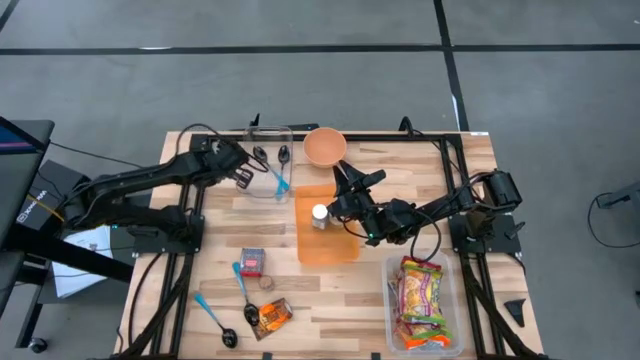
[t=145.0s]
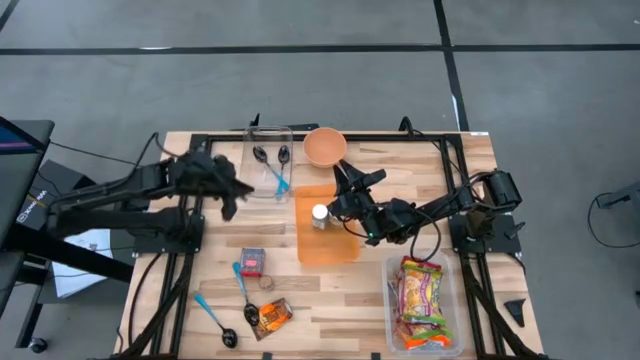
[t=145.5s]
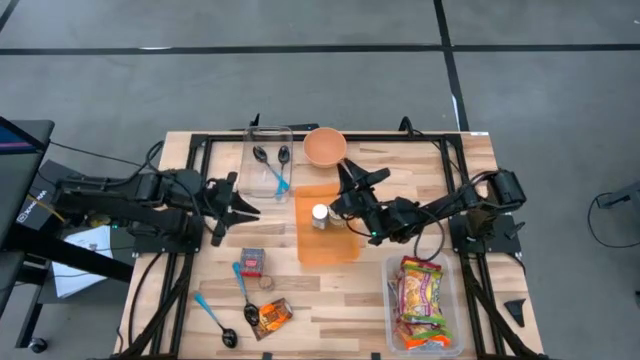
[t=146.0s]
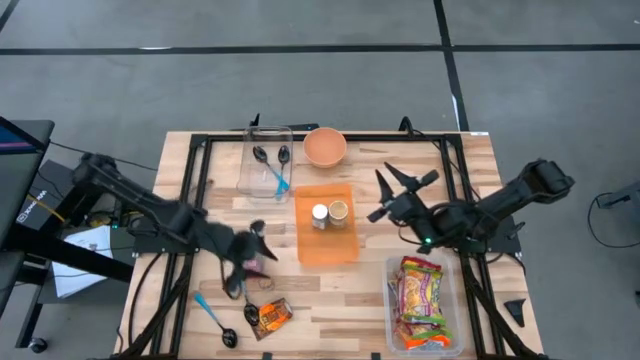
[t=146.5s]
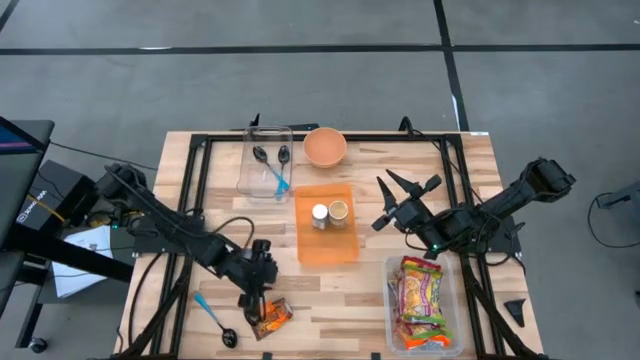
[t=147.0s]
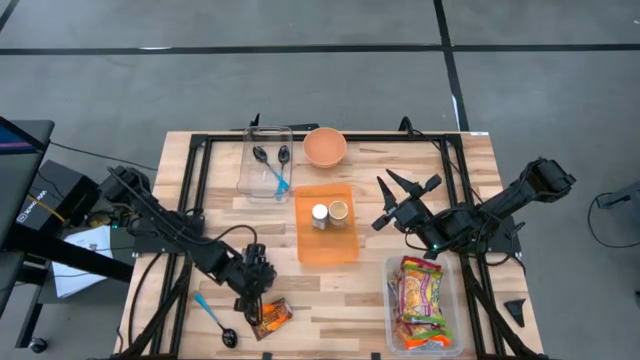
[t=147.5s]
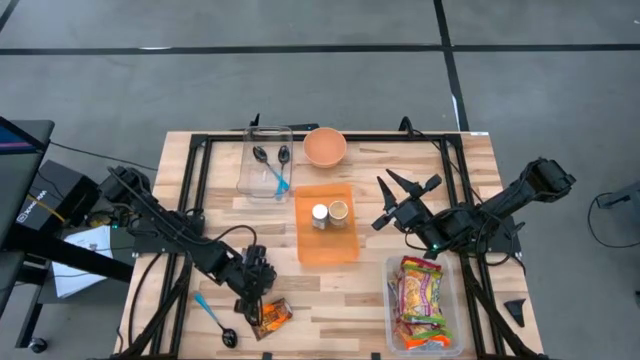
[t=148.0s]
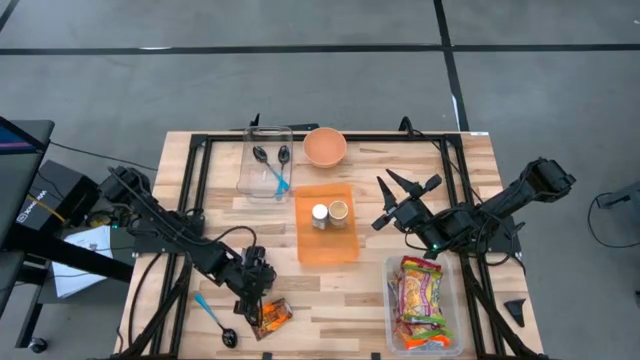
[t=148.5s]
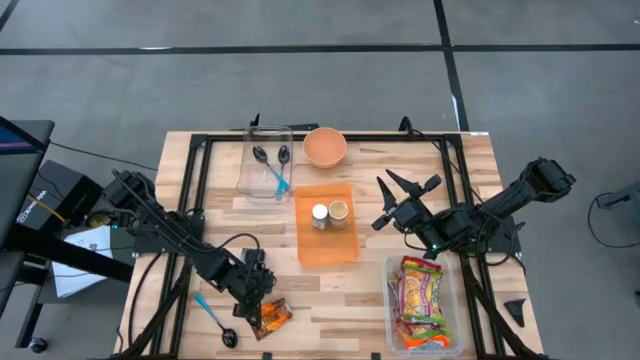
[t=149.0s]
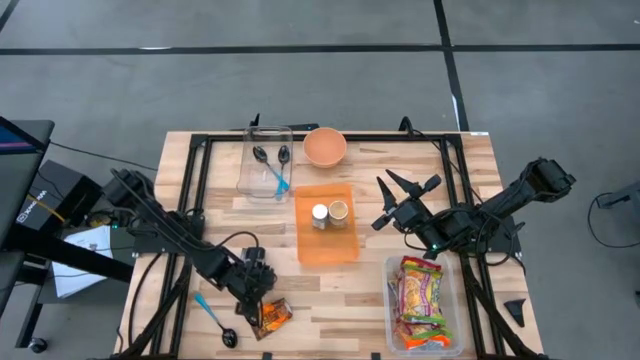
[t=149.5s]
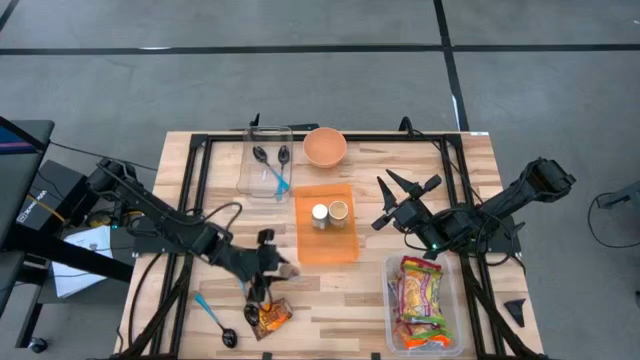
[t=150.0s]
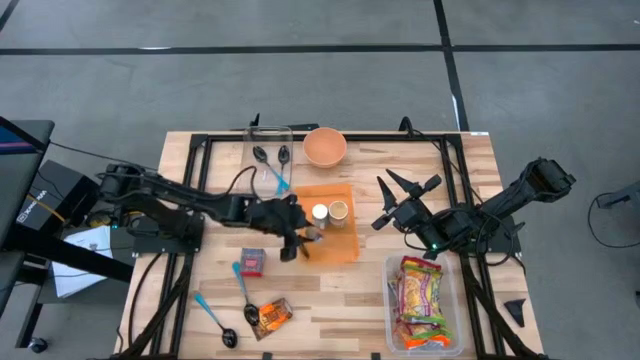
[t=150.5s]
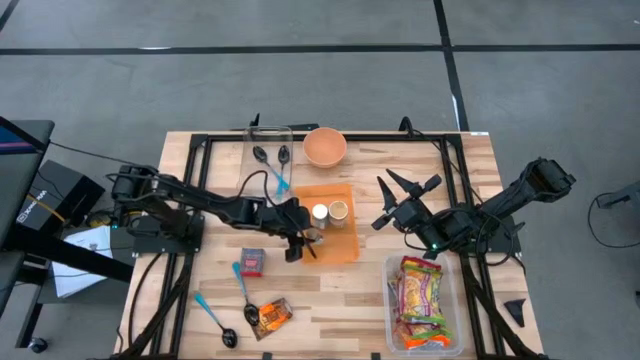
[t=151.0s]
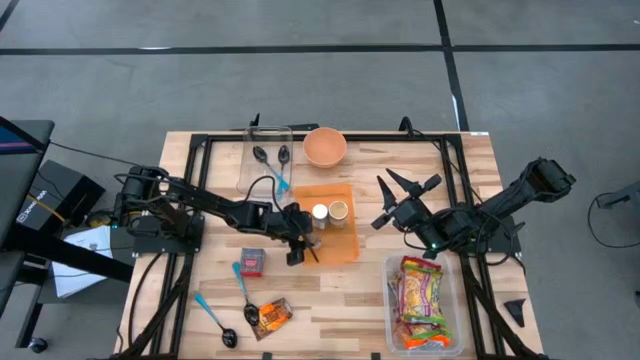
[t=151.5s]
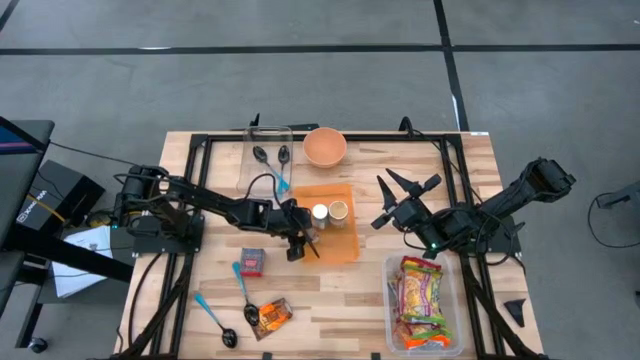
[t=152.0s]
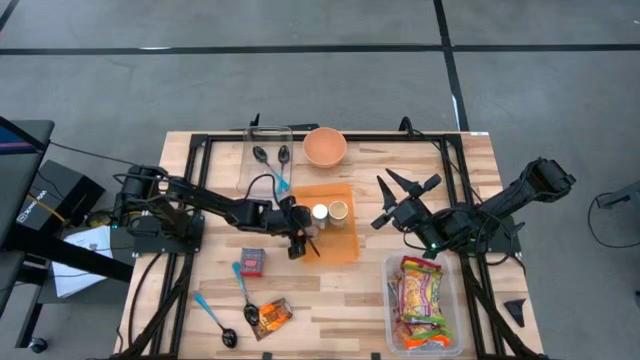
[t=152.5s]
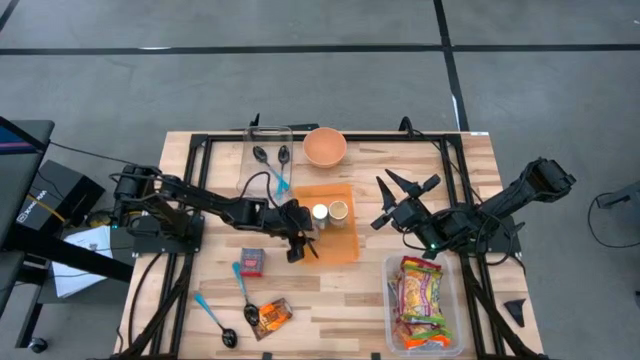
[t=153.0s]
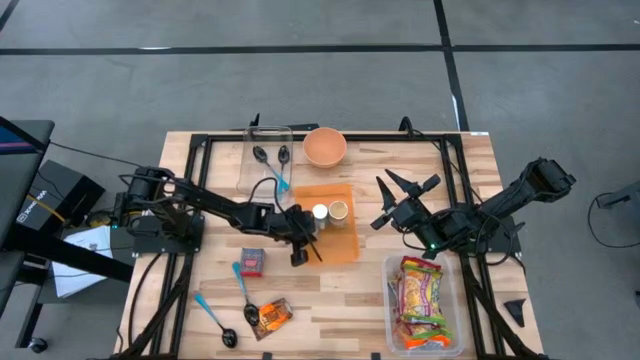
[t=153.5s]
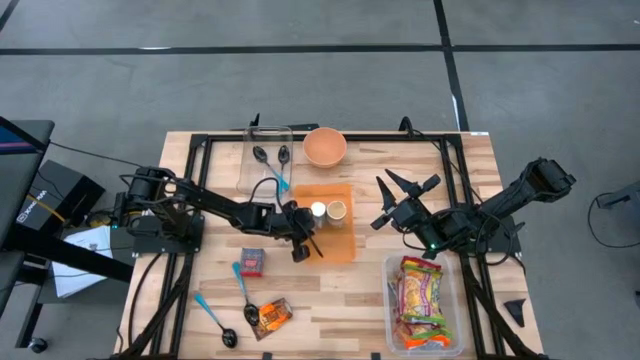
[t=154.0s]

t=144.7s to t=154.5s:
Task: Pick & Place Food Item
Put the brown seasoning bottle into the orange bin

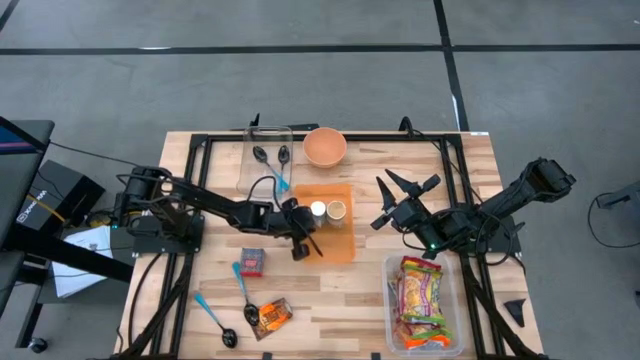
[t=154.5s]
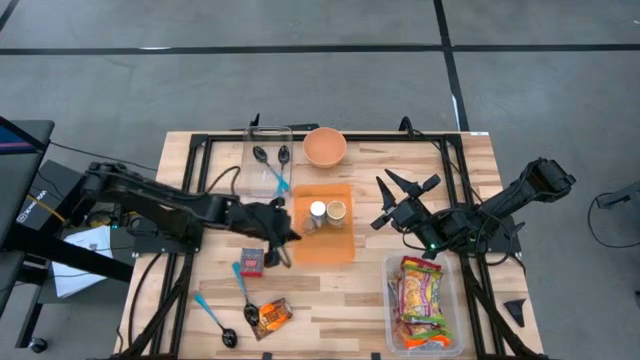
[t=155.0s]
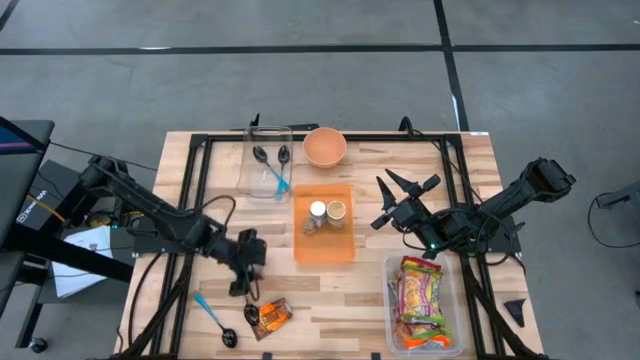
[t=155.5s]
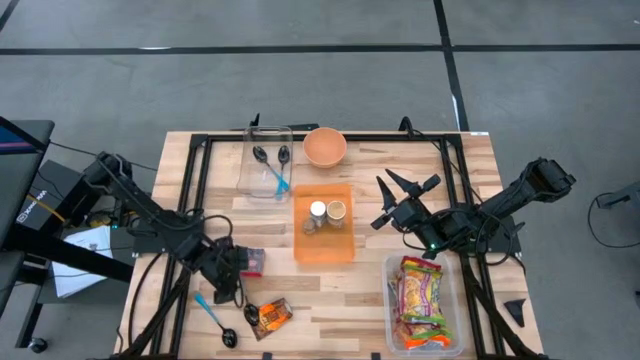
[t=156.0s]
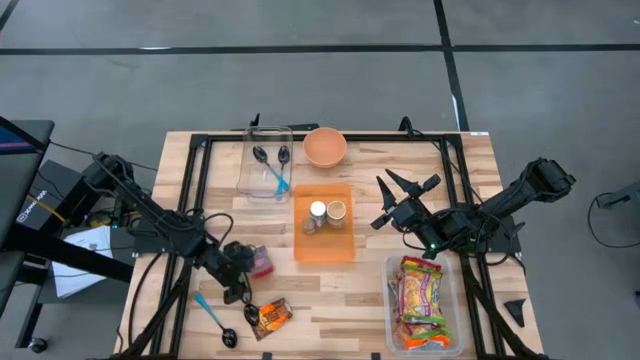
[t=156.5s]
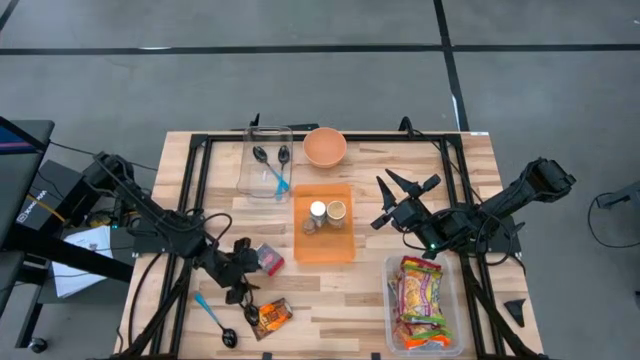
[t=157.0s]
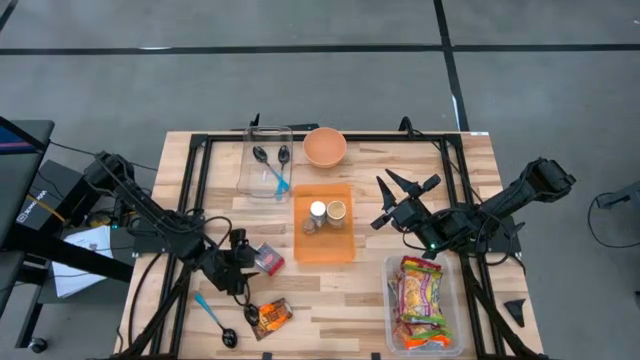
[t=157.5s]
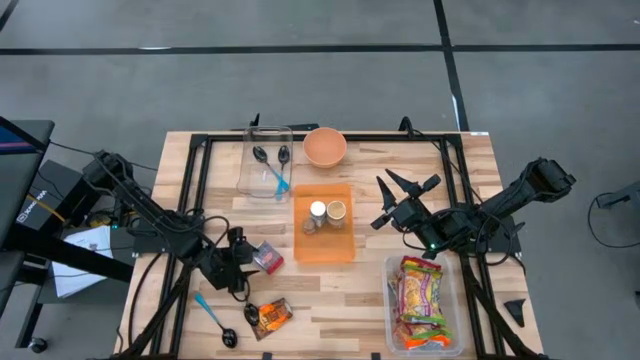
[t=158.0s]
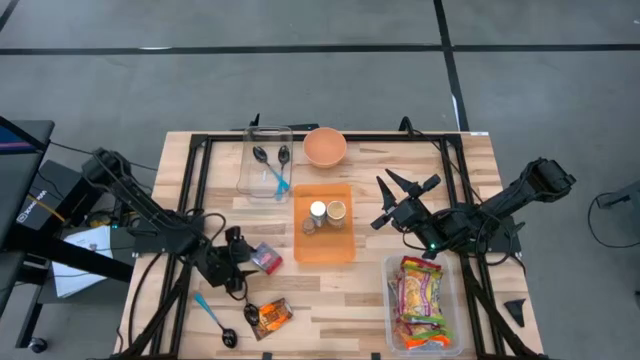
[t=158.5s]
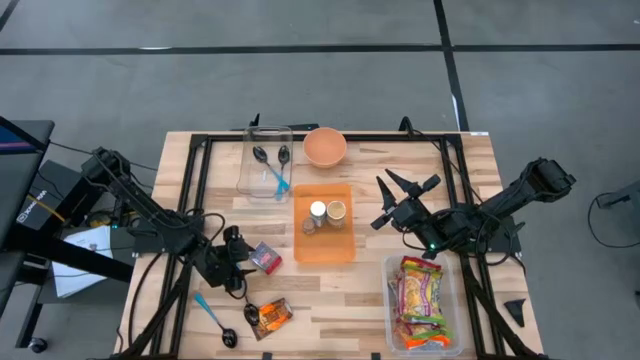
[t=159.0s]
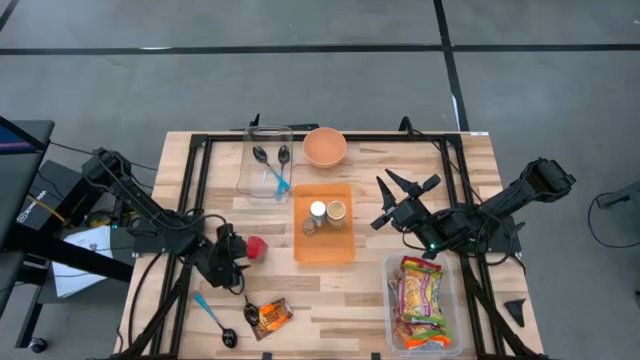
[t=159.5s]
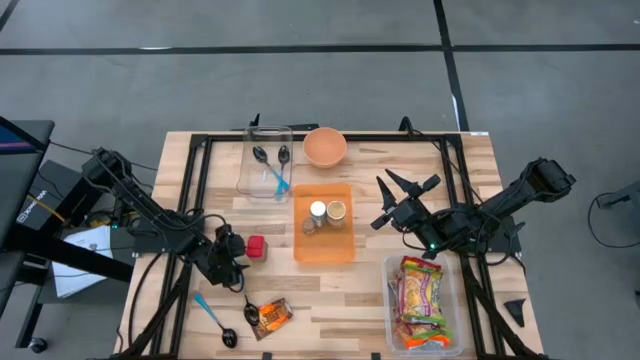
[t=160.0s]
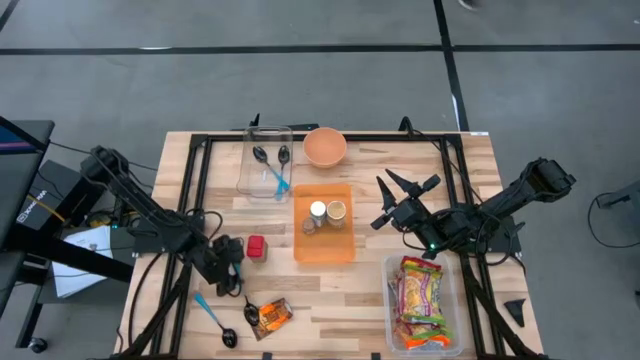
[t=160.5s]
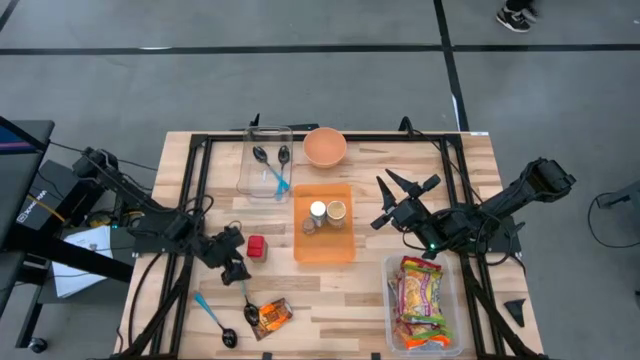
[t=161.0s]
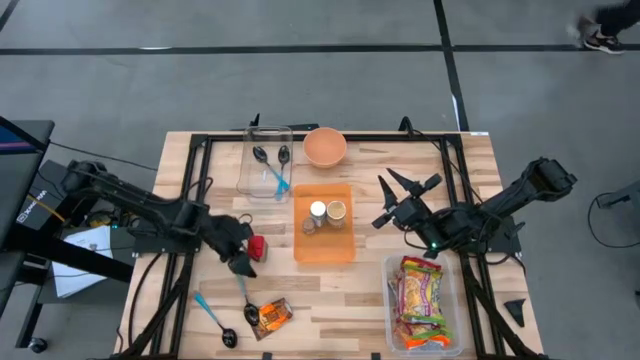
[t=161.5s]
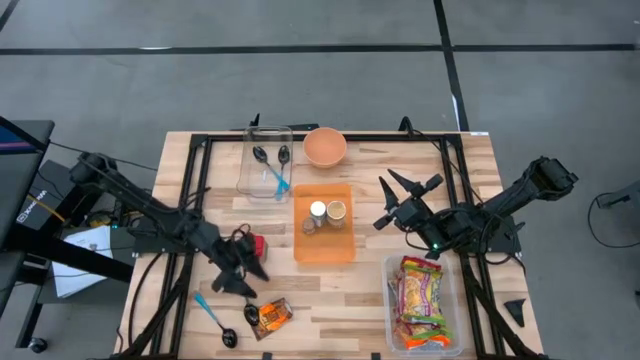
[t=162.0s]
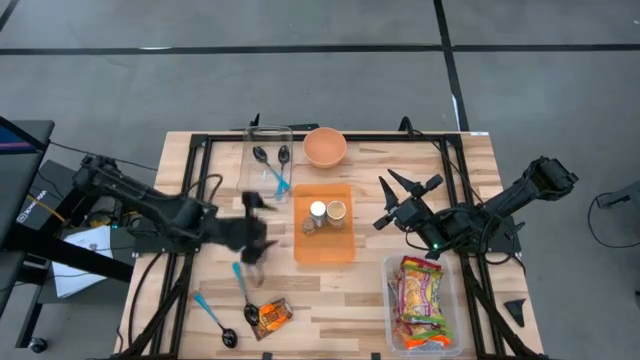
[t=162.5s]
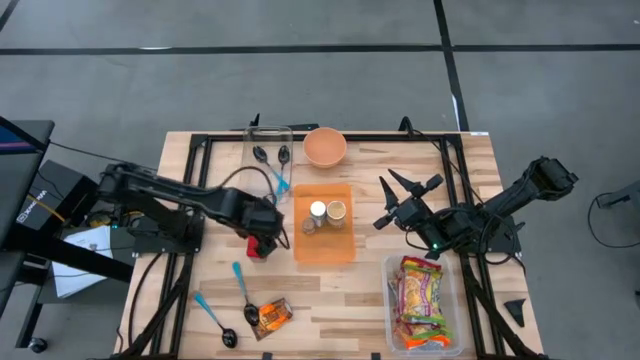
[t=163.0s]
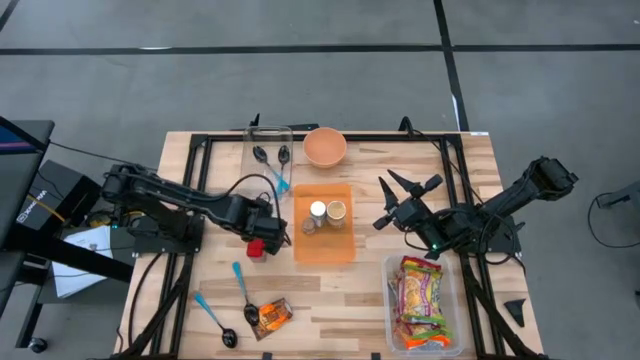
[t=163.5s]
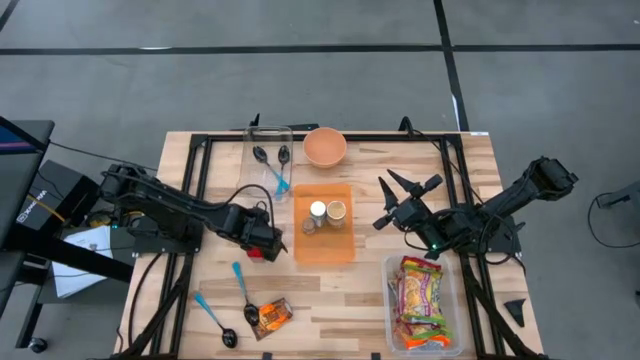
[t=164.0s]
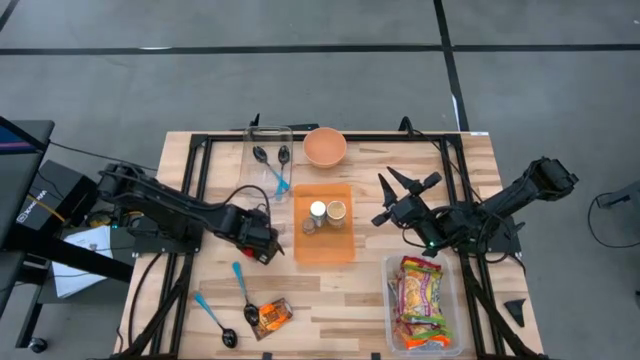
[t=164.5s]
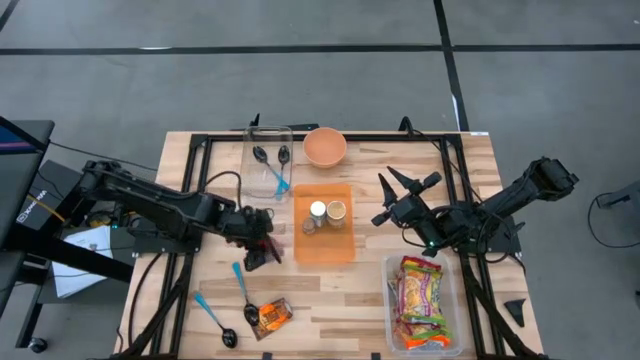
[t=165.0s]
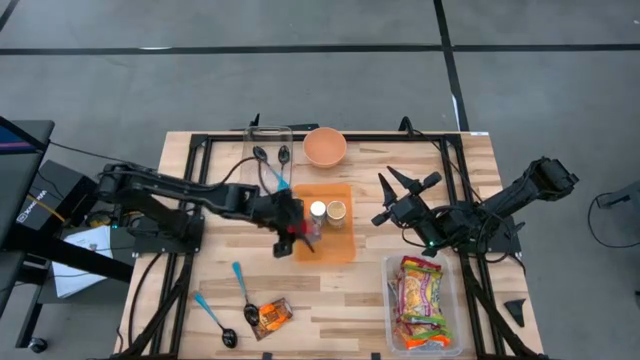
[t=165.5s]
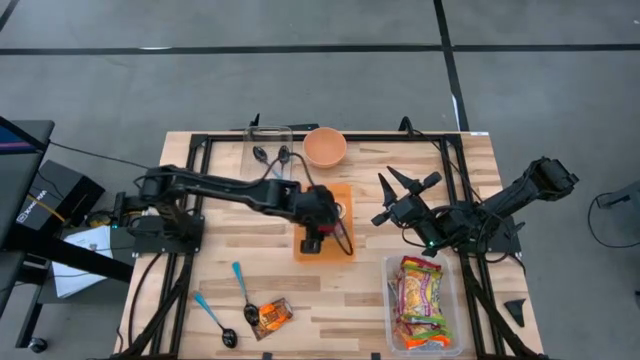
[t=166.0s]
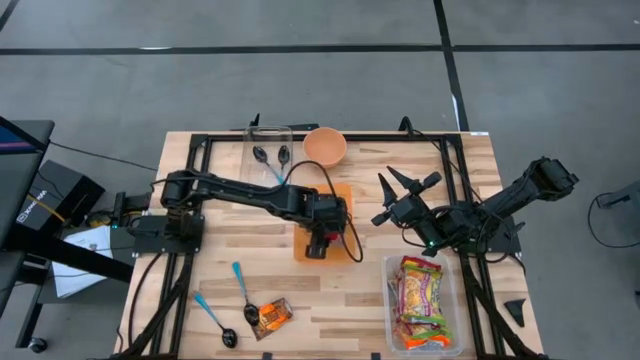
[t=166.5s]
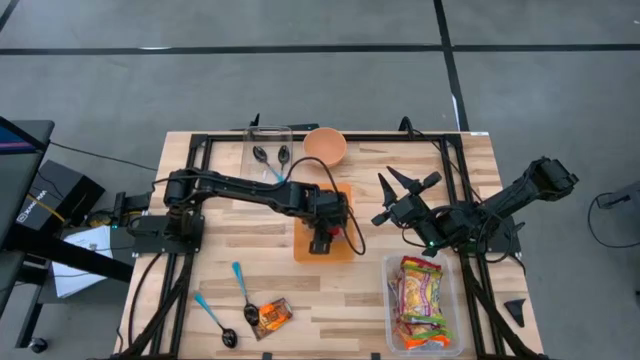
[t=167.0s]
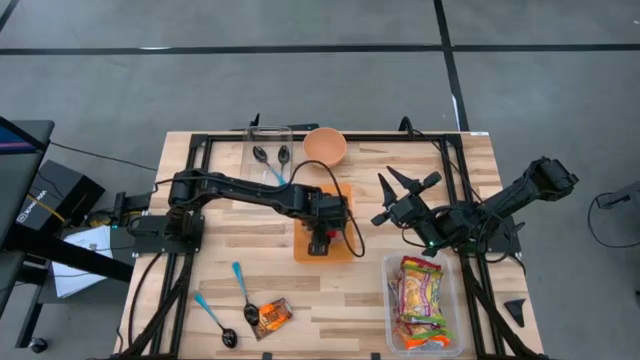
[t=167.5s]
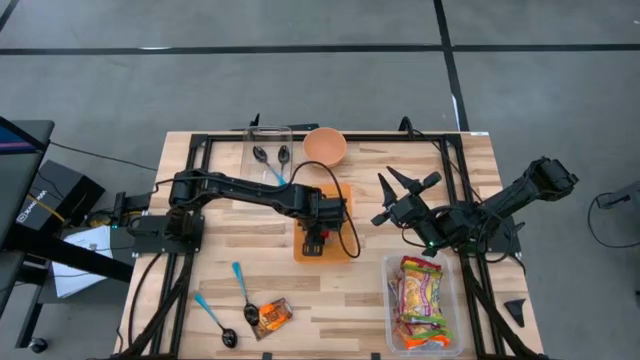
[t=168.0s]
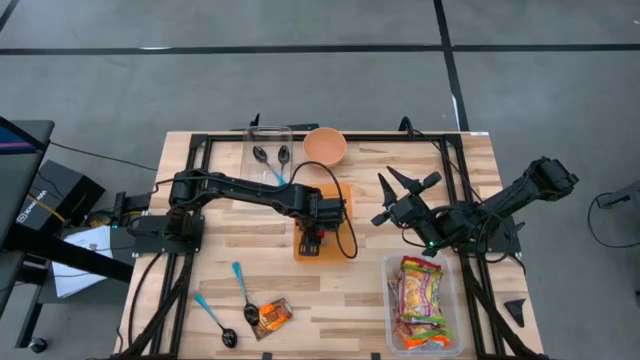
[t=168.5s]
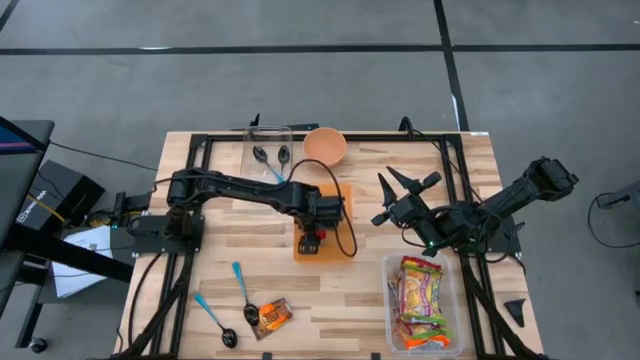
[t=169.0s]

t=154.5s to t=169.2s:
Put the red seasoning can into the orange bin
